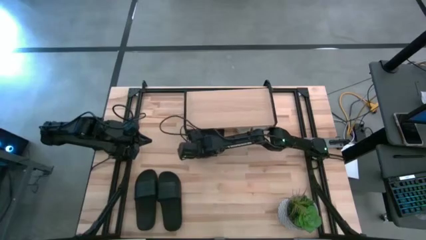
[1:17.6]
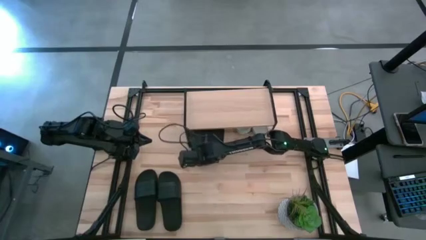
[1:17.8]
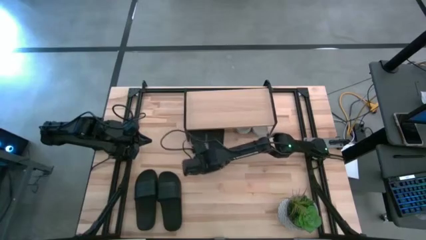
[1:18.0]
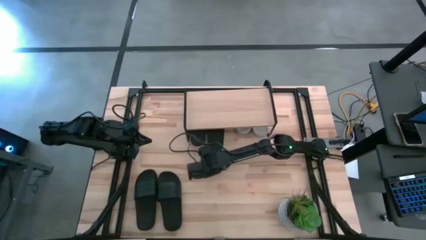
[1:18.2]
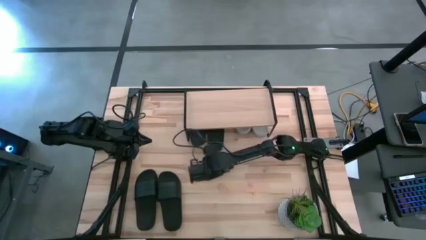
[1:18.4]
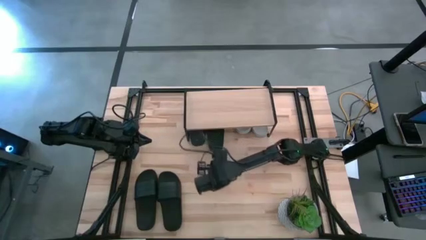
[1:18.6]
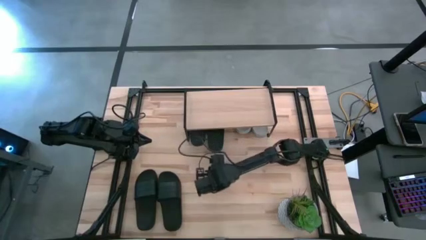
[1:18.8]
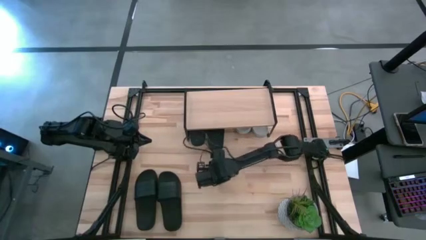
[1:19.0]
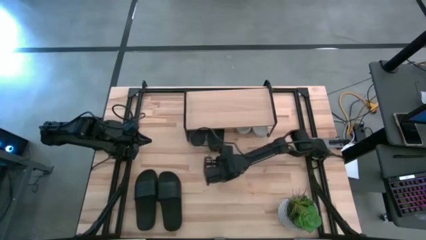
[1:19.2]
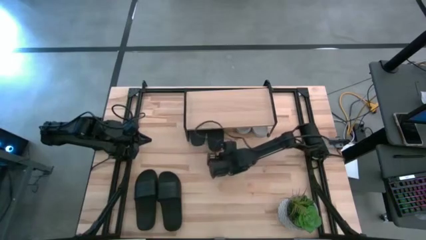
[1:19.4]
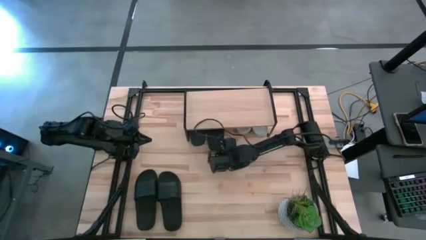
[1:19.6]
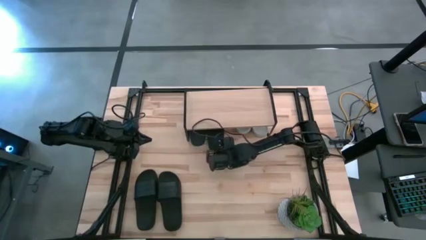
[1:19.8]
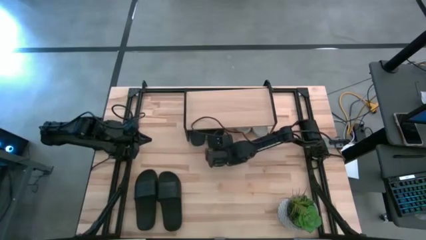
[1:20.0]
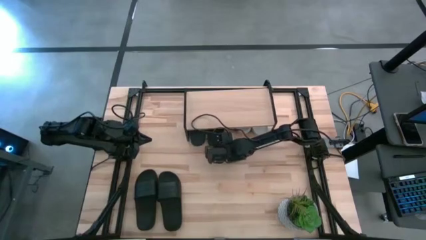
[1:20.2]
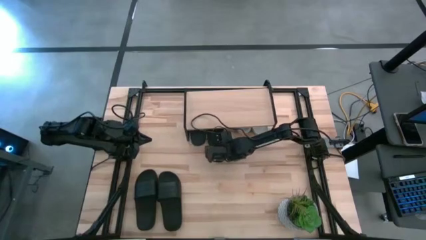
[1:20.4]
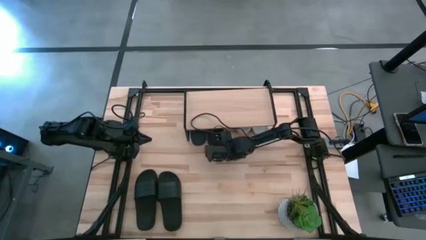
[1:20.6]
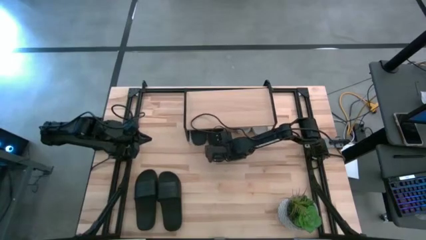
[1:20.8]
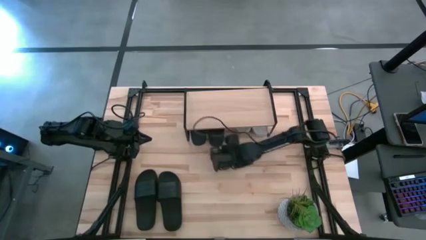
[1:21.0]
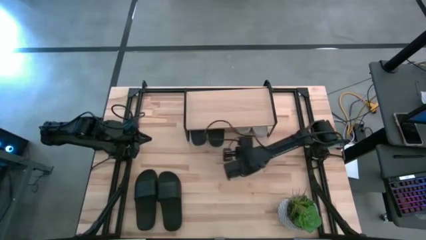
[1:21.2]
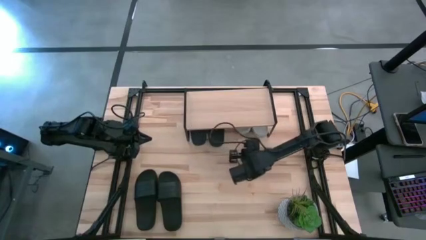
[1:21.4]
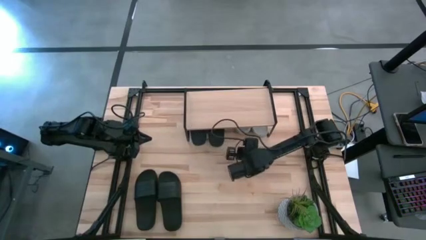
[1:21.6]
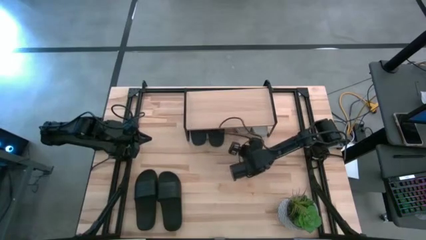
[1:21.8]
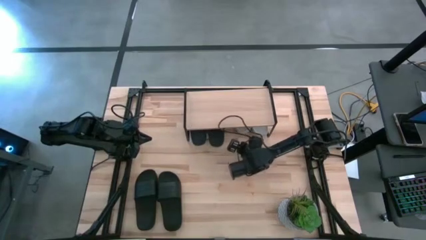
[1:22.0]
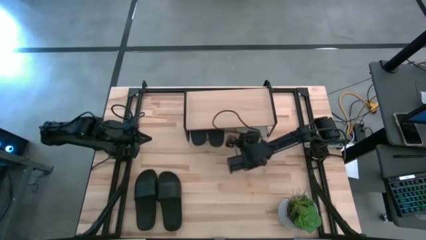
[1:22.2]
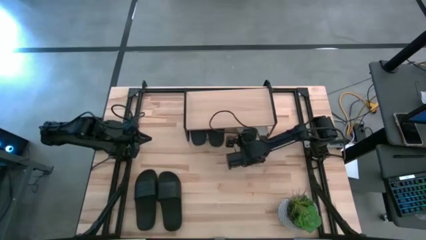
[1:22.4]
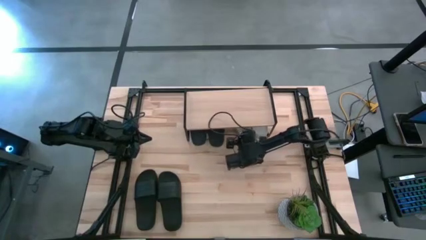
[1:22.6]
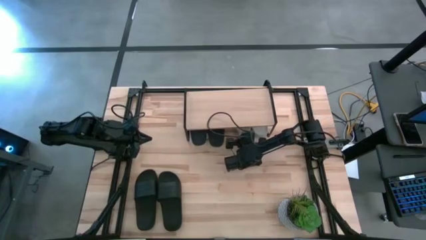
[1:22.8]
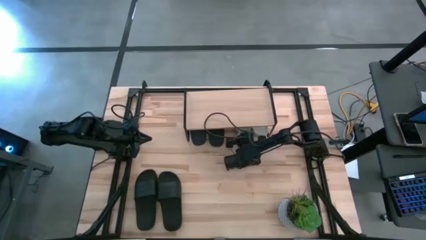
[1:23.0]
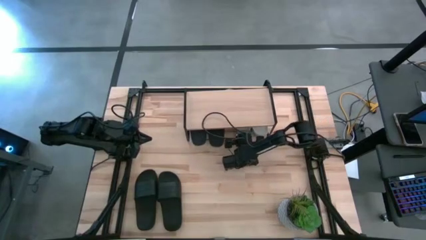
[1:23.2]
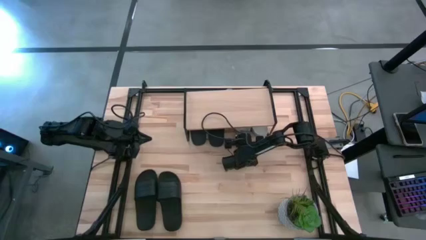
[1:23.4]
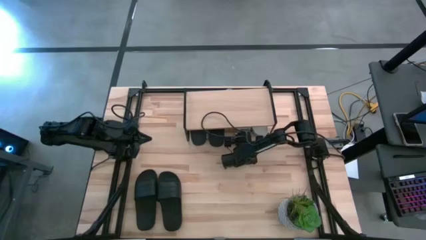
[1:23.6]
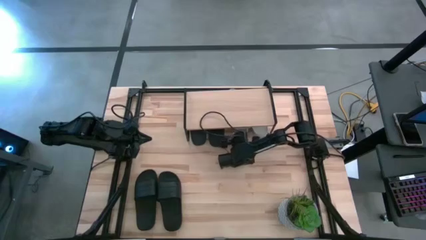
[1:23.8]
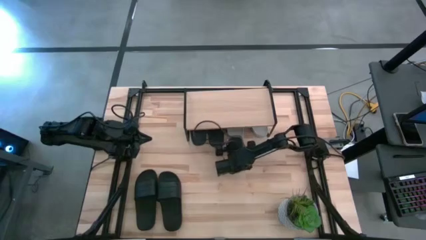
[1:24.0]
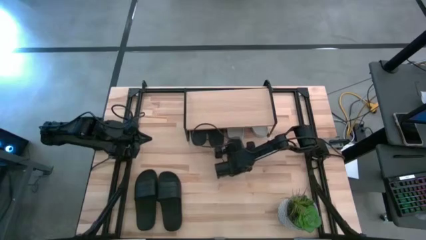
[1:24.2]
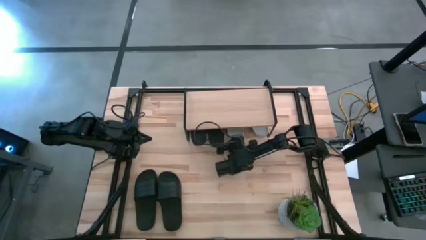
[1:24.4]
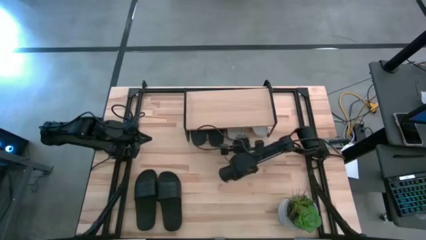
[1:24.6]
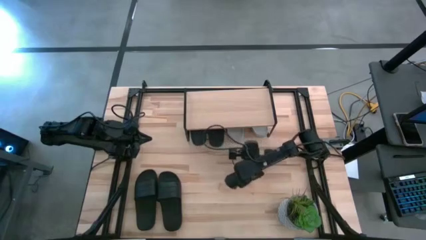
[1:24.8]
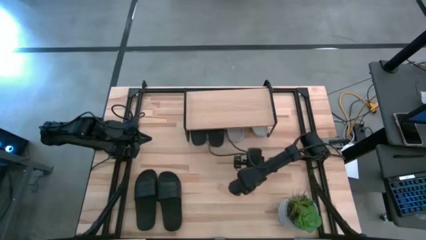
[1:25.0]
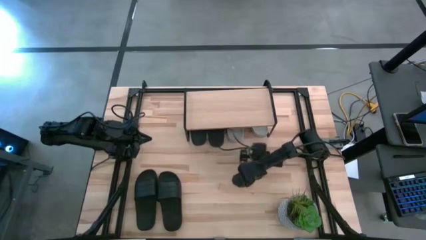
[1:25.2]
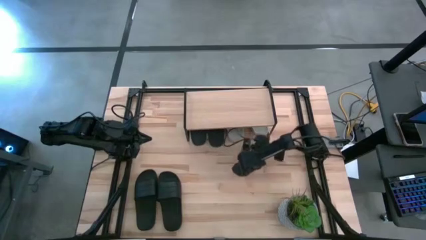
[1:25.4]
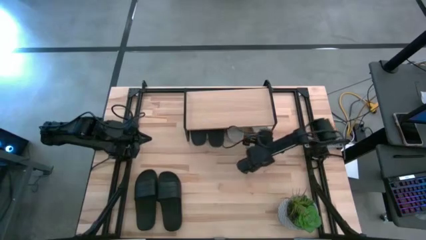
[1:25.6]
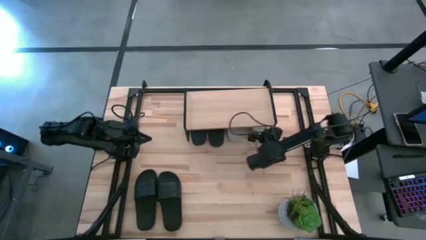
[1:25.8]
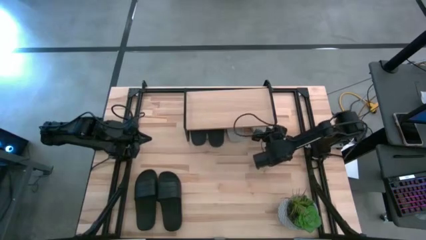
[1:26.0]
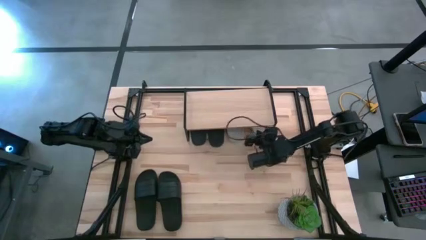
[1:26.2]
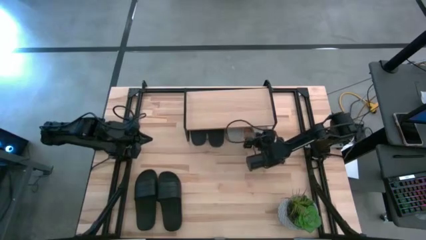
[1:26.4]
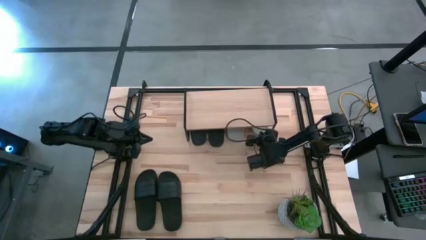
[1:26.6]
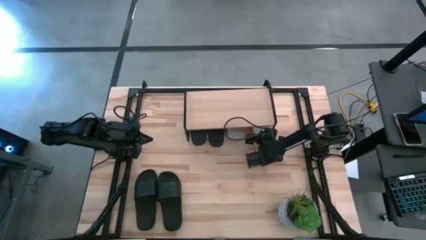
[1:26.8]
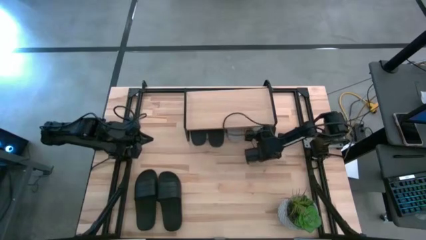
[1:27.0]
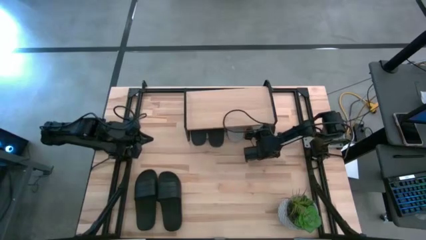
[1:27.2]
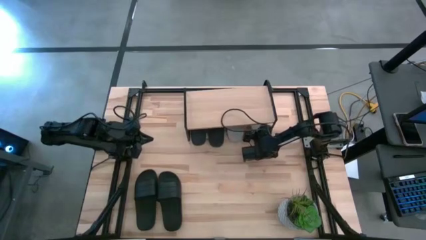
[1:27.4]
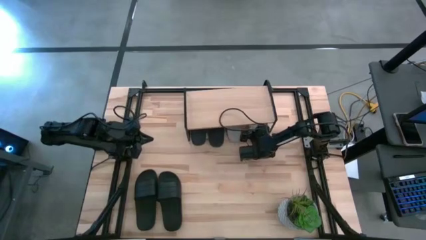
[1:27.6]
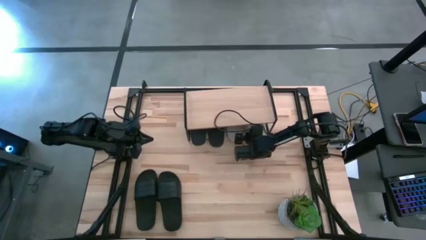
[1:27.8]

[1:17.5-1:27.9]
Task: Pick and place slides into the shelf
Adjust the slides under the shelf

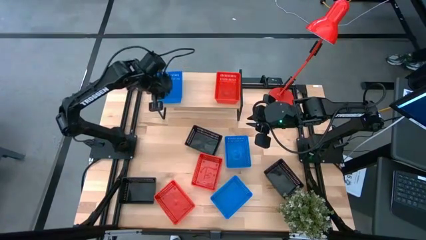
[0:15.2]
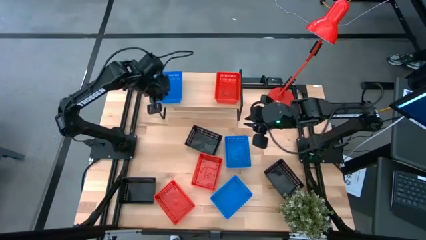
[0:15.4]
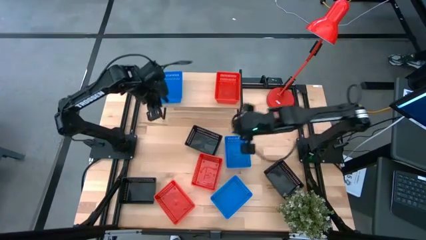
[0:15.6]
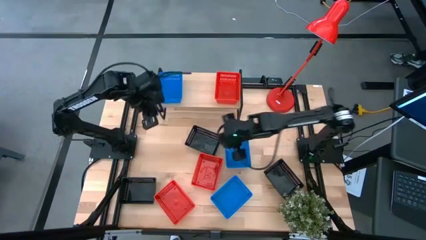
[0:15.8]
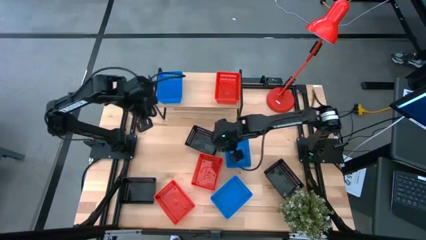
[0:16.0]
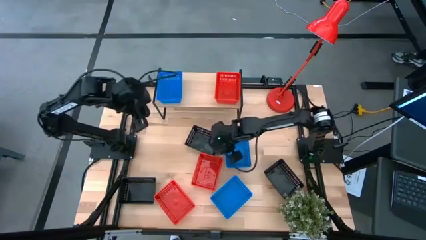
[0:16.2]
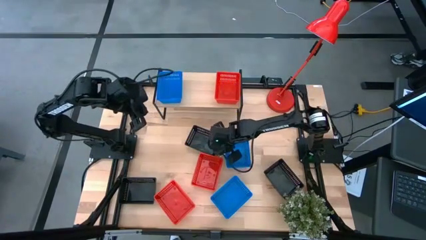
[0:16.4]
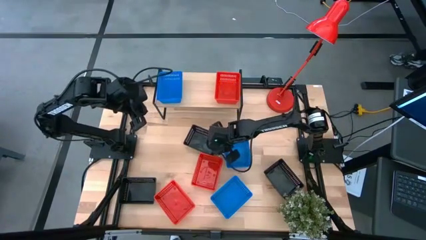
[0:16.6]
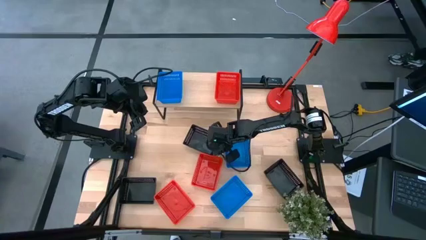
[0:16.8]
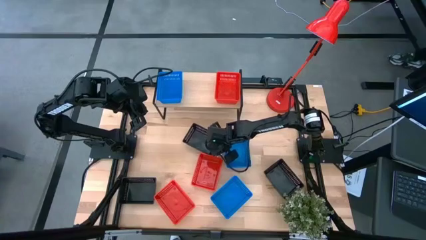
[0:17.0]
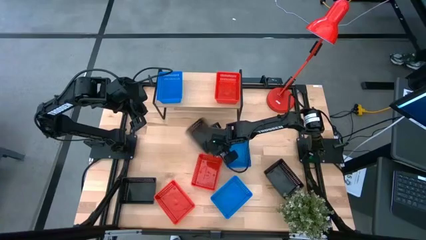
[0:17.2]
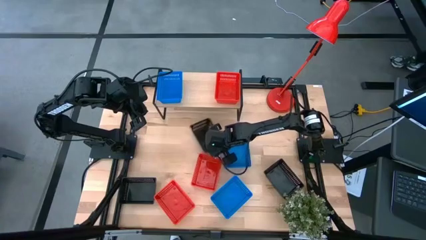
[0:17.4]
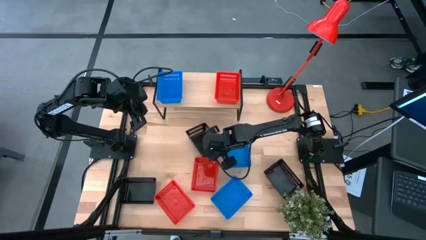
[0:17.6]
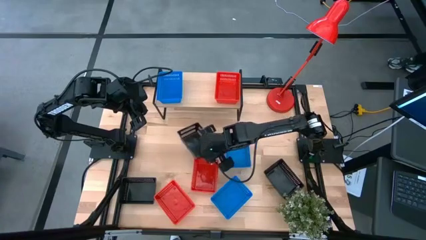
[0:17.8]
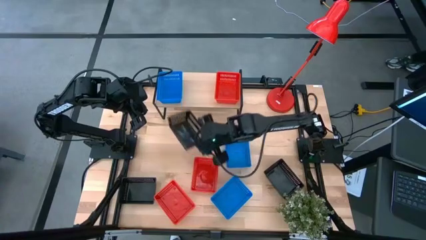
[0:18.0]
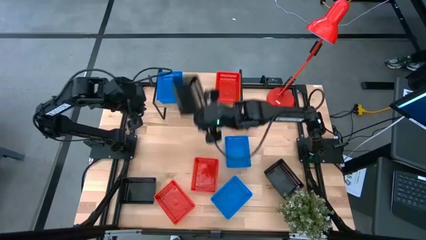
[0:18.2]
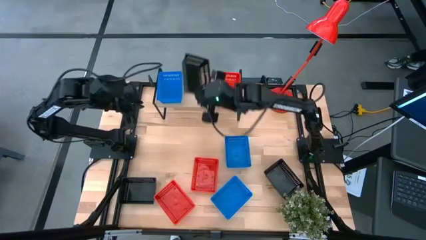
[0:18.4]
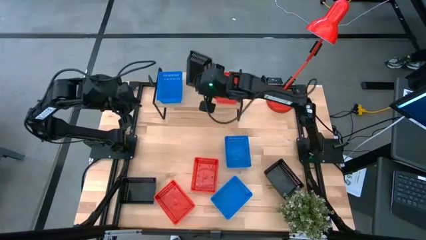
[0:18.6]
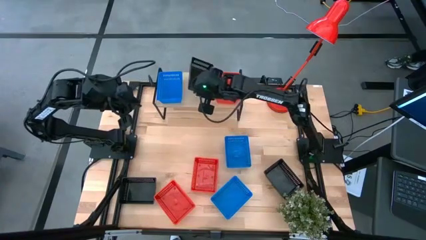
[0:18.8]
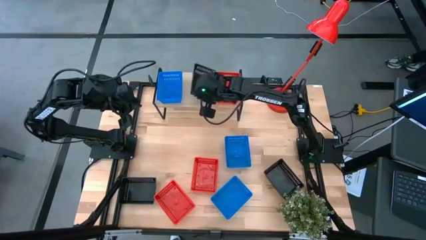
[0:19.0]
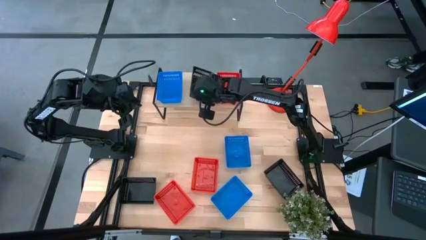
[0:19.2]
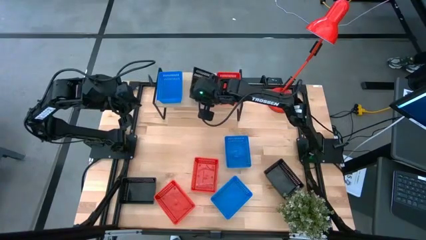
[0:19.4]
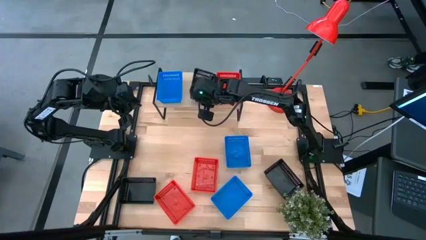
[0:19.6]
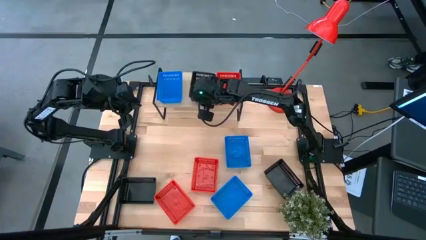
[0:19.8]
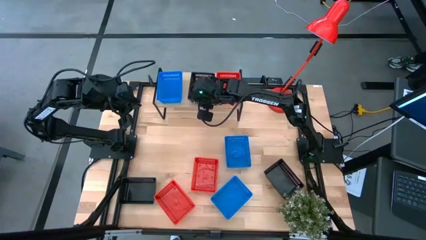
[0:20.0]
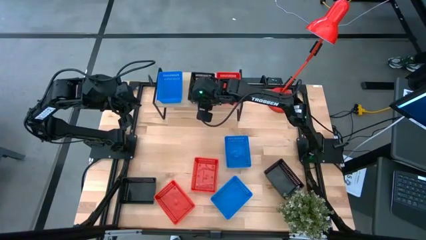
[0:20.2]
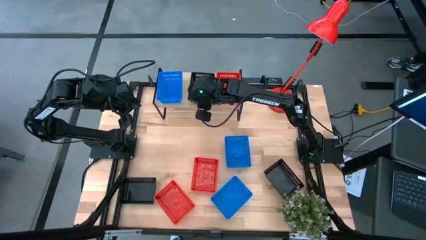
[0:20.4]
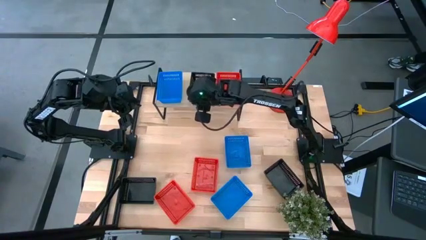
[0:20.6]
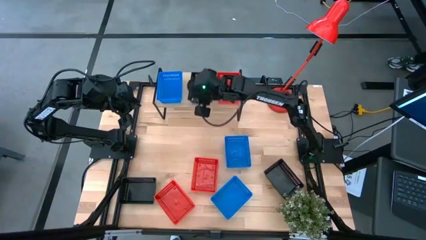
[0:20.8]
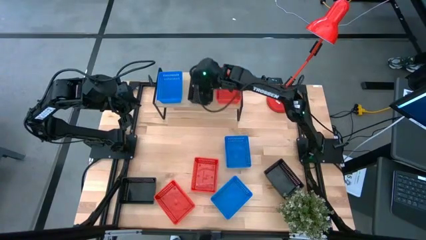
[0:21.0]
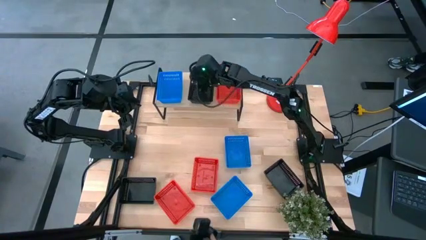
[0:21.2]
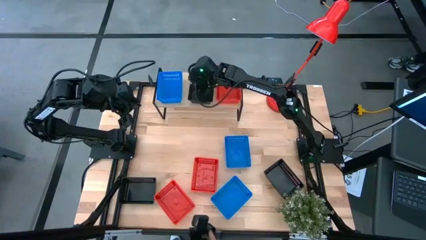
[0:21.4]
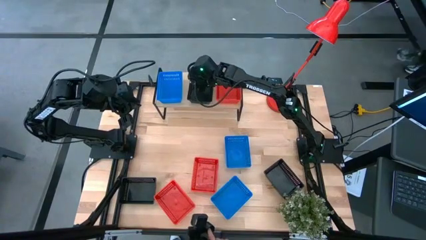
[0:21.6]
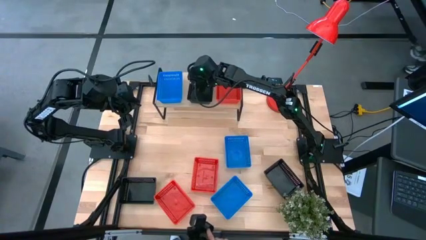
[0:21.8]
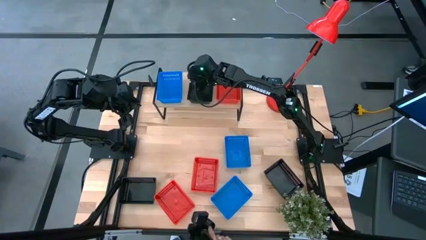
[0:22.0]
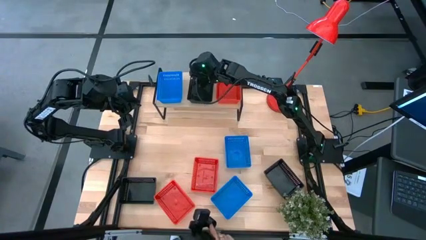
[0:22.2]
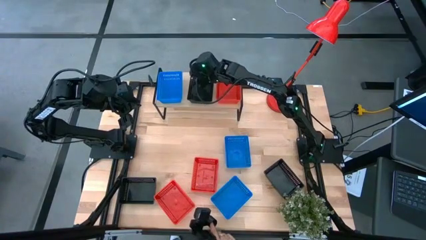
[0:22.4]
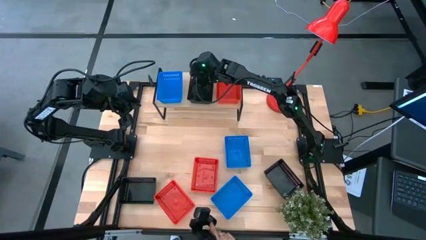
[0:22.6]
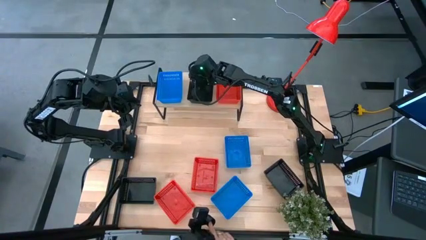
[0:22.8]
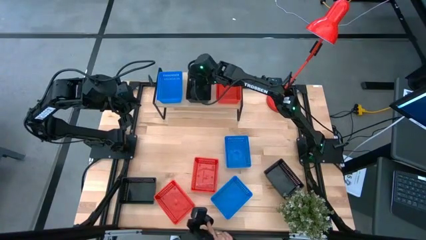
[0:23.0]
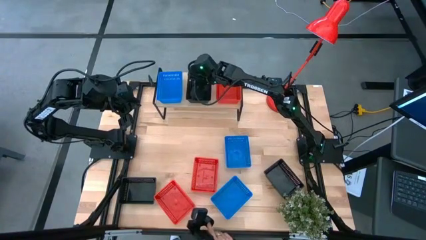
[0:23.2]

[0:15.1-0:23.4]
Task: Stack baskets on shelf by color
Put the top black bin on the shelf
